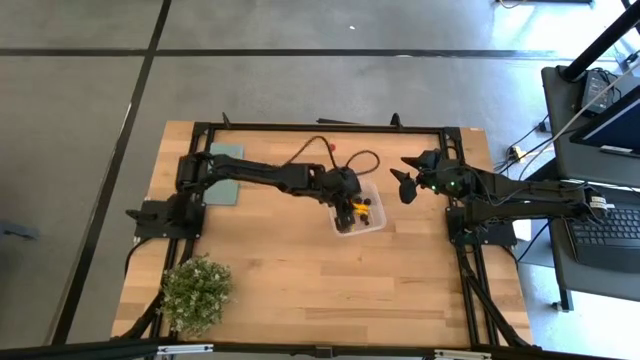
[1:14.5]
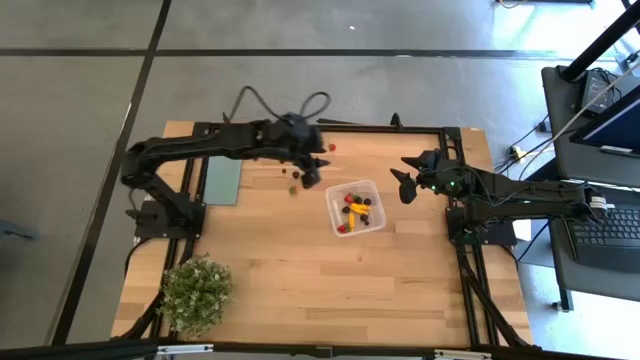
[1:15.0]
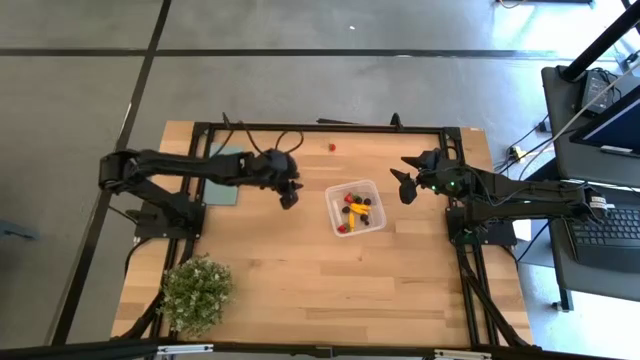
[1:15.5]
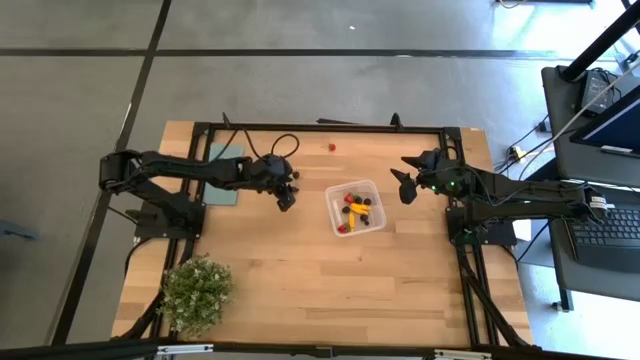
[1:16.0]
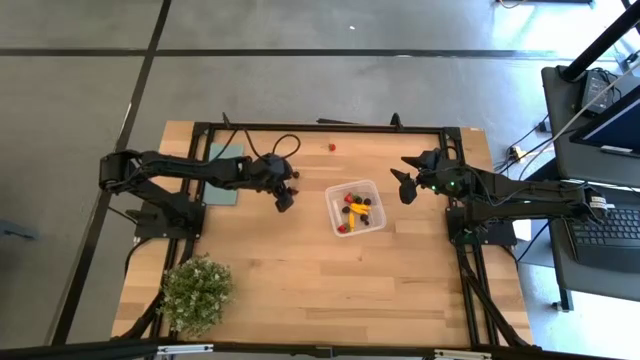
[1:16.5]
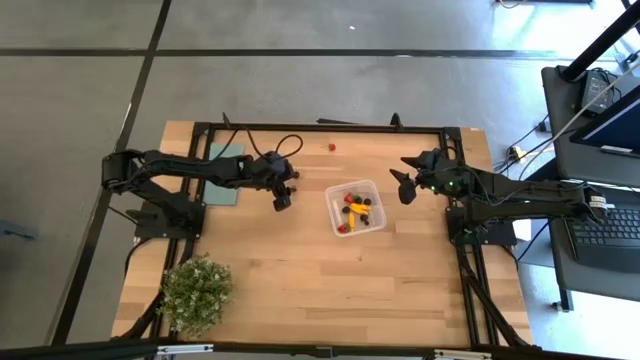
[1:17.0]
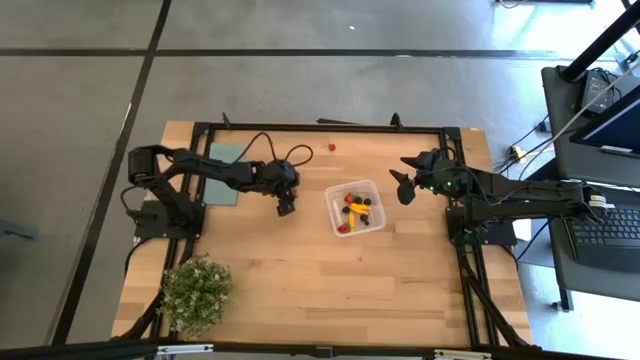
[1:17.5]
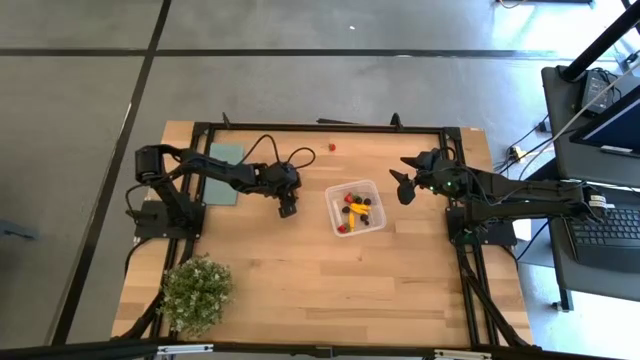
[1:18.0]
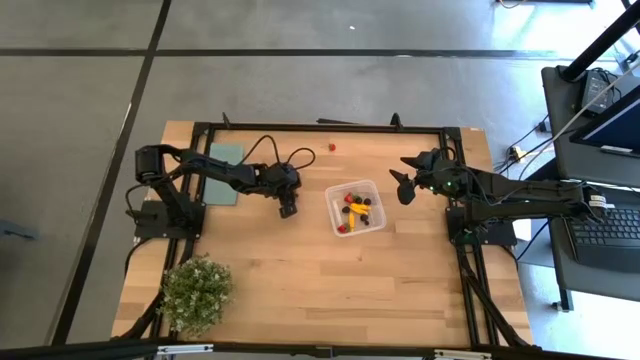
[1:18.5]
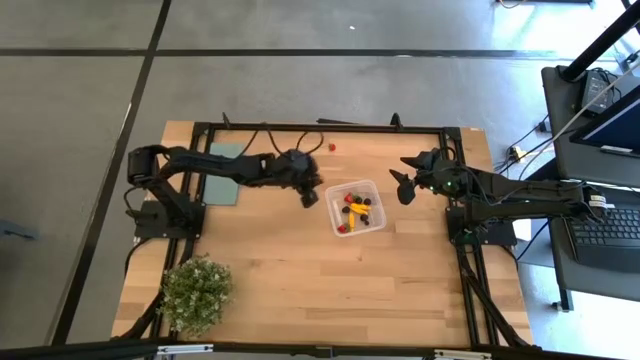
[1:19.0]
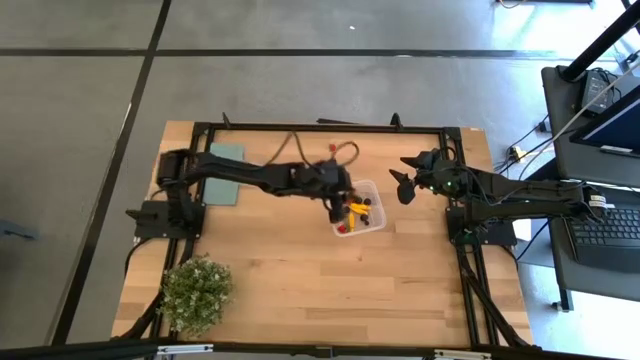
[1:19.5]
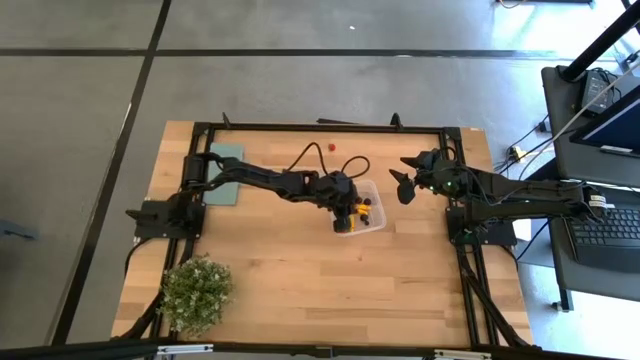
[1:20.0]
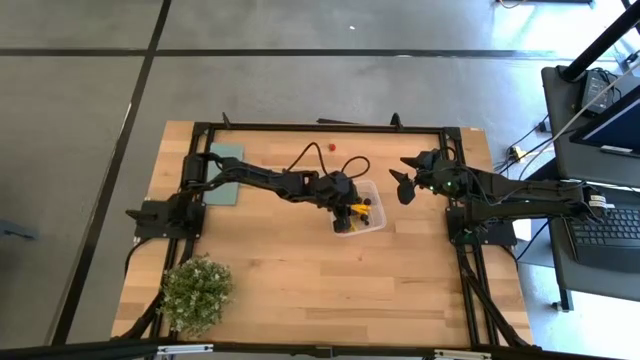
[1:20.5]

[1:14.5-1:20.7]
Task: Pick and placing Produce into tupperware
Put the left strawberry into the transparent bin

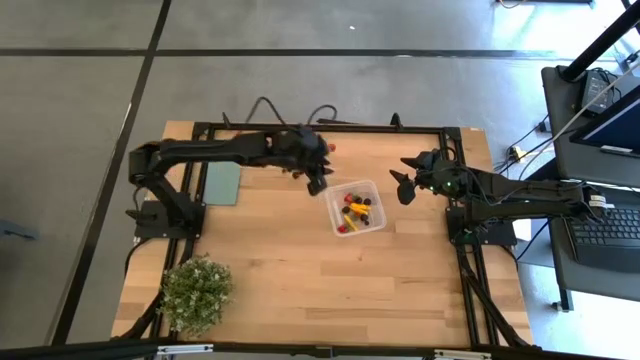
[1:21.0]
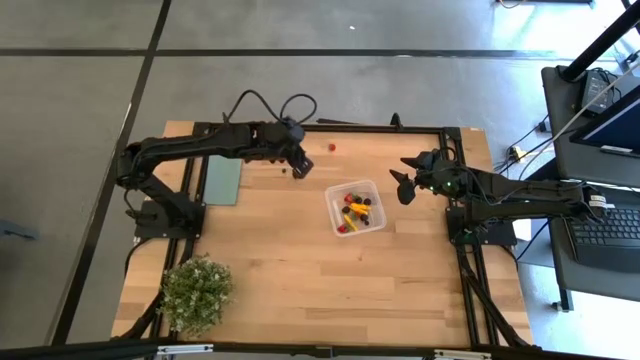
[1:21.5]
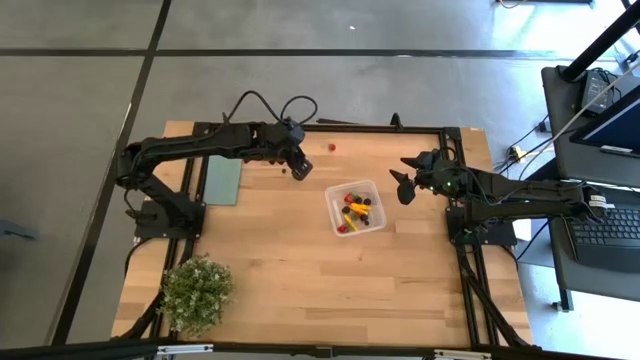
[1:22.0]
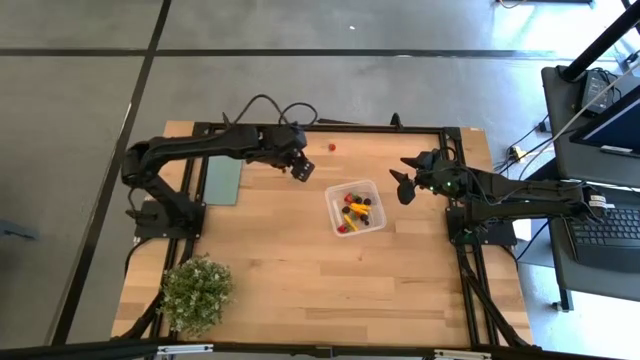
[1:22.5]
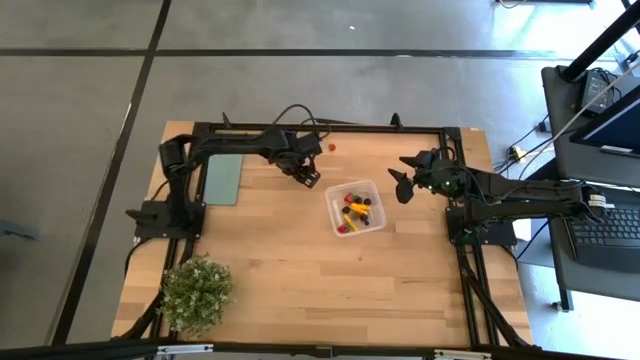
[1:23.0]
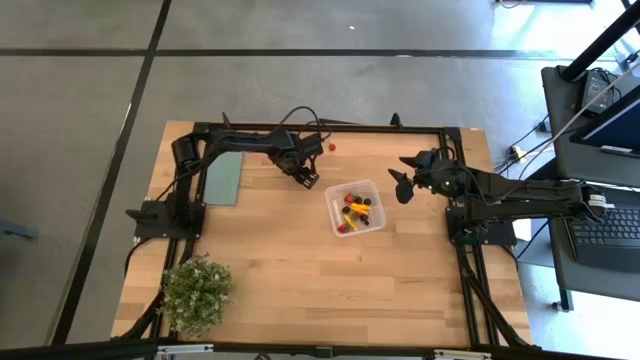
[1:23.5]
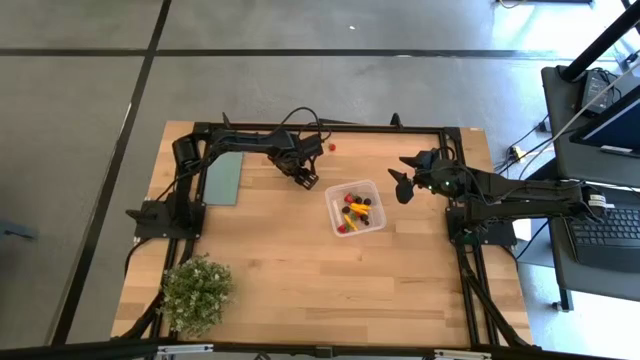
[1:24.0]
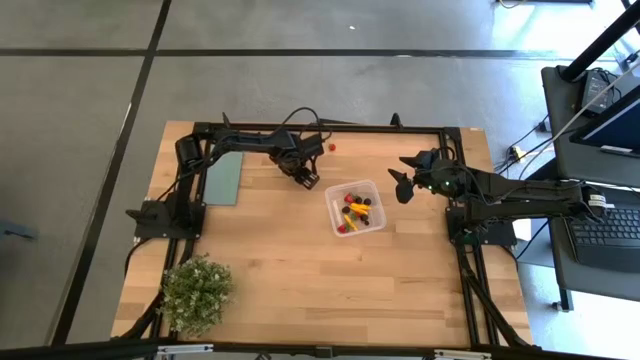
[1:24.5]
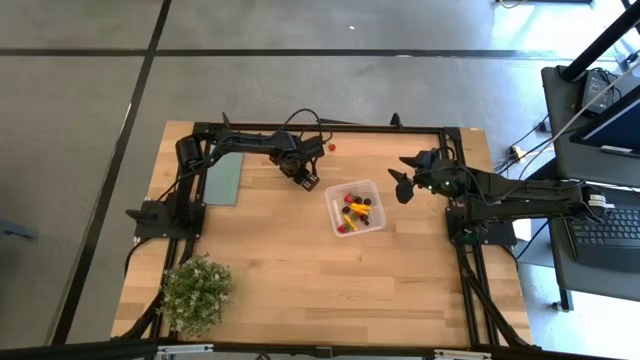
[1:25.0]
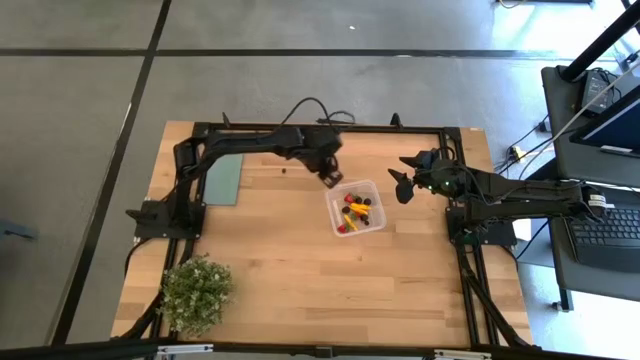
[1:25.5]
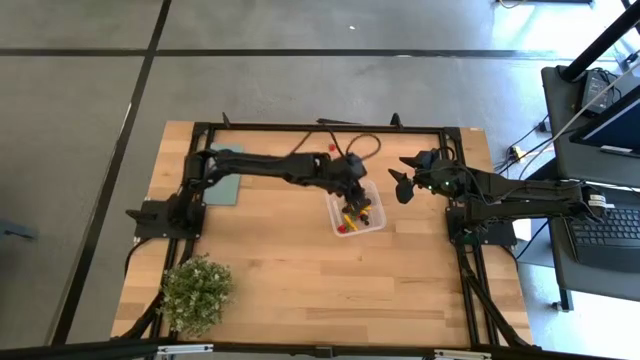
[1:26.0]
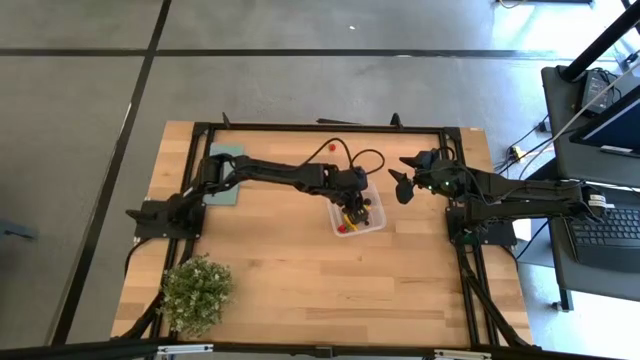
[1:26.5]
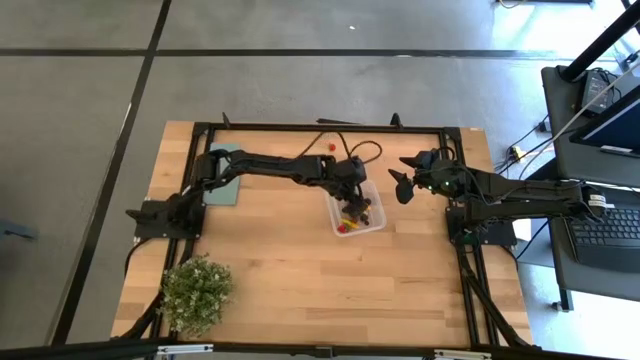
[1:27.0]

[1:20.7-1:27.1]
Put the cherry into the transparent bin

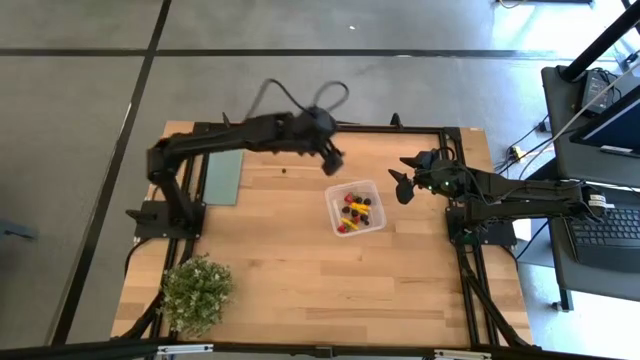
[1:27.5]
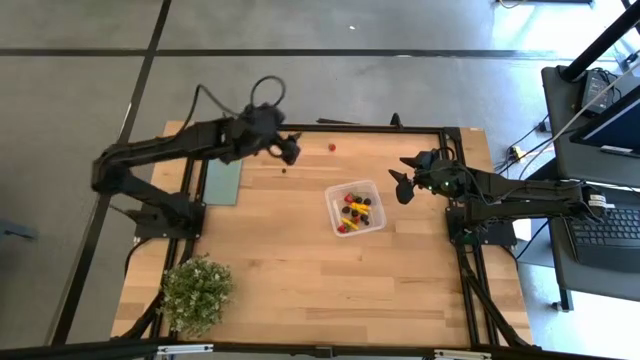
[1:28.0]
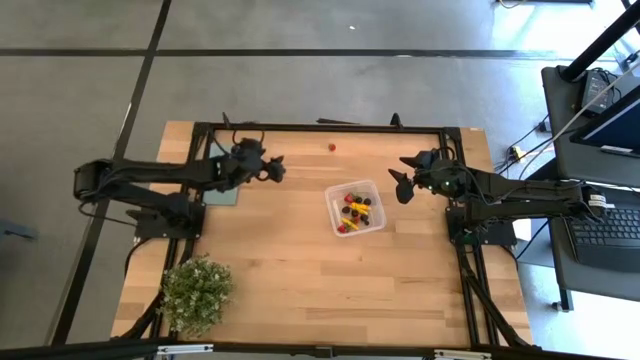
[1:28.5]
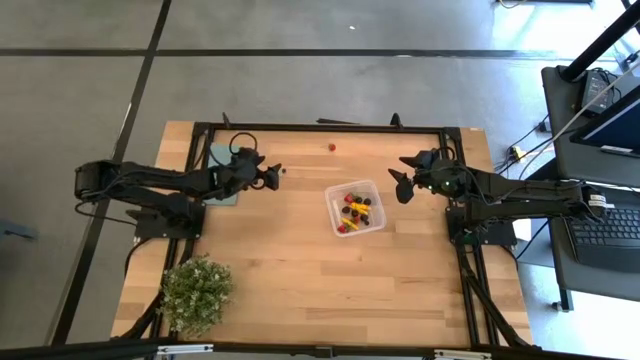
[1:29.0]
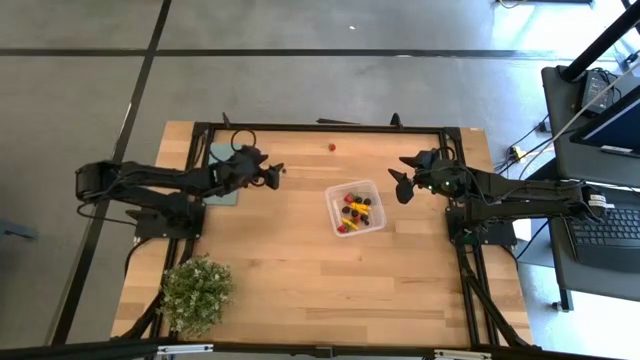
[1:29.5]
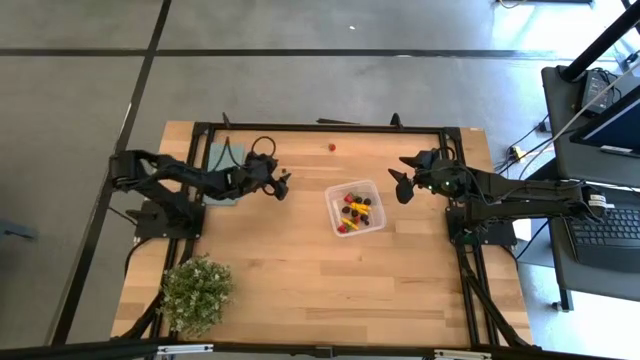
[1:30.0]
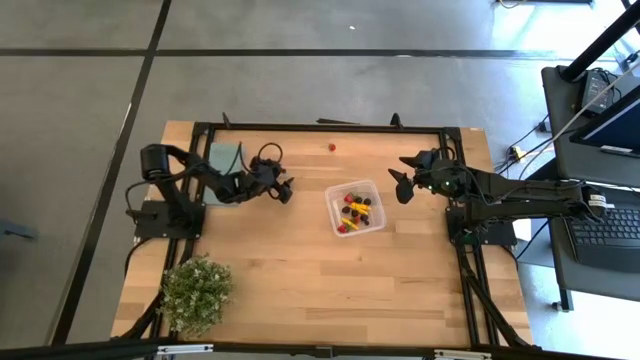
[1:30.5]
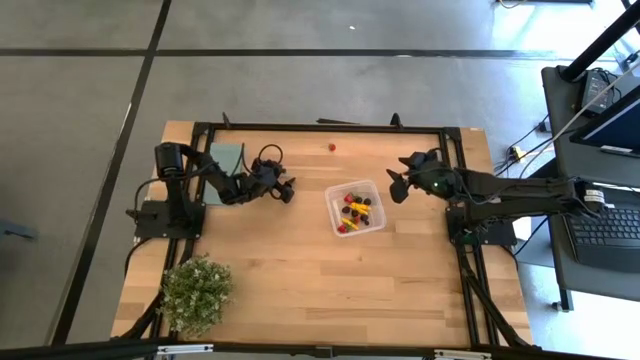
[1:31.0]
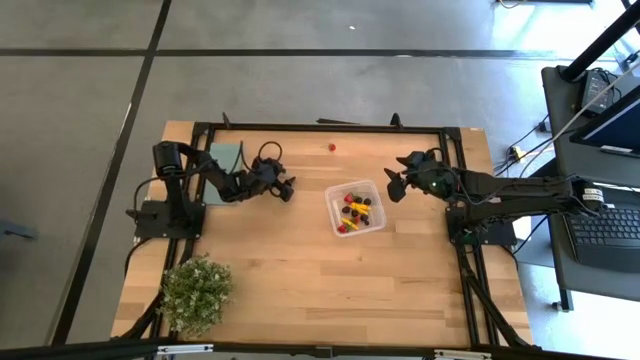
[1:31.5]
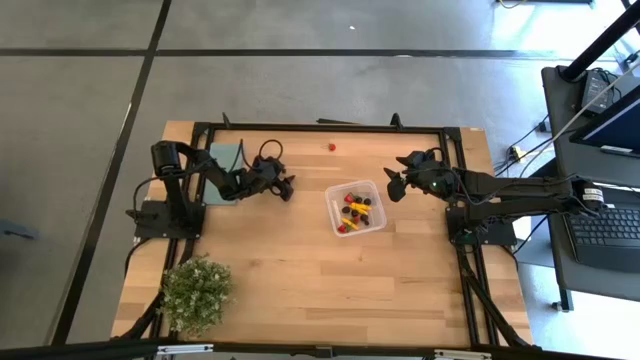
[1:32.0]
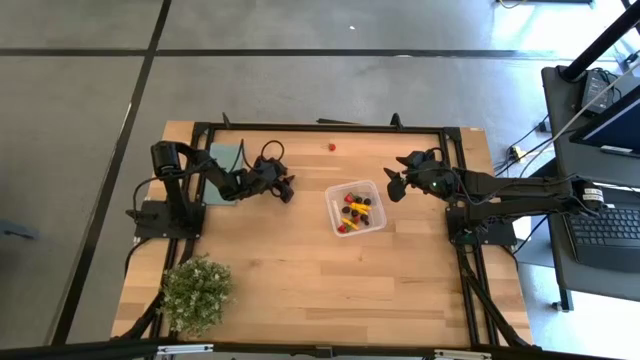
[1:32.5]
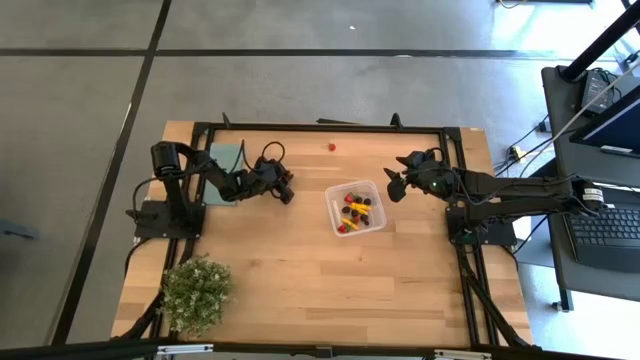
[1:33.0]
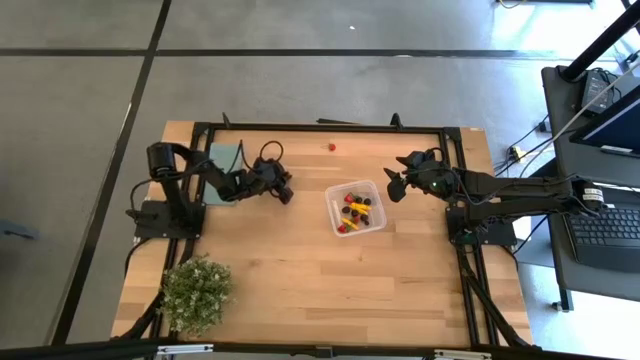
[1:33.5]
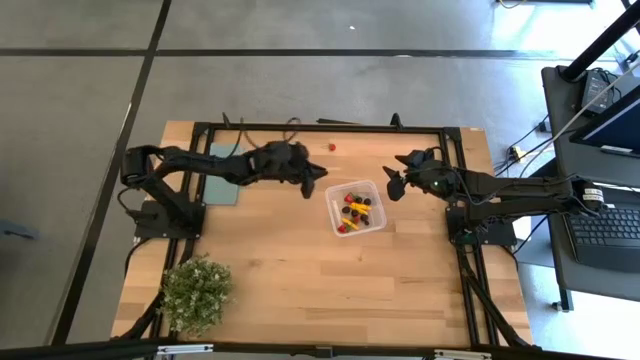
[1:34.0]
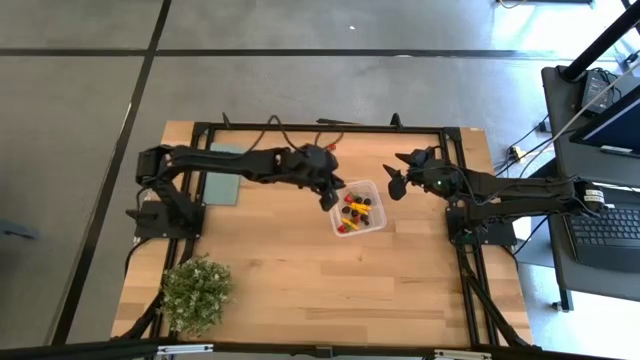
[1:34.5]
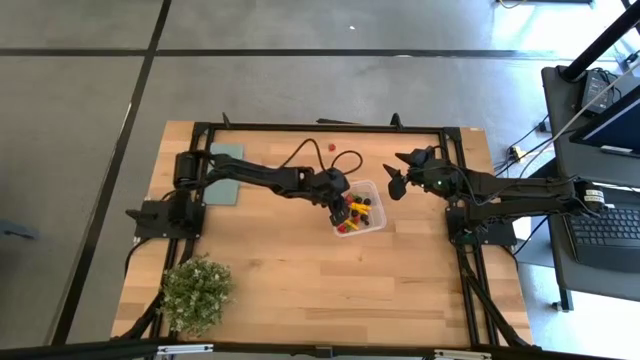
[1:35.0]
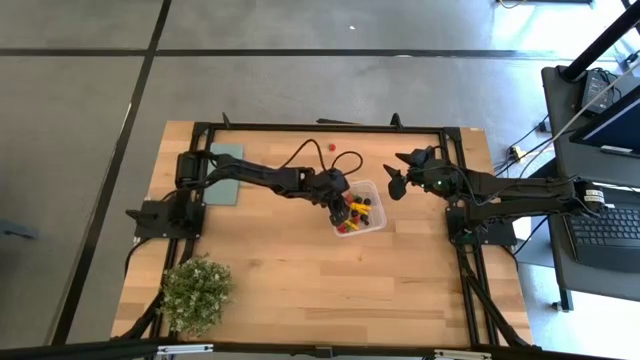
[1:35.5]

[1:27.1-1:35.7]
Put the blueberry into the transparent bin
